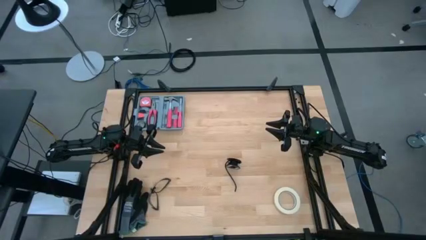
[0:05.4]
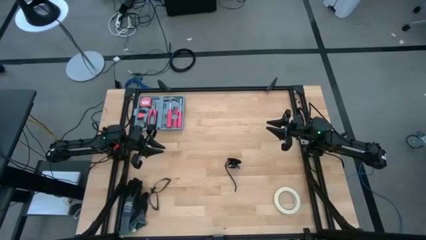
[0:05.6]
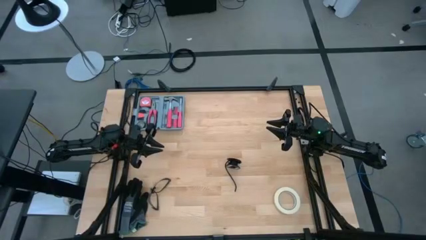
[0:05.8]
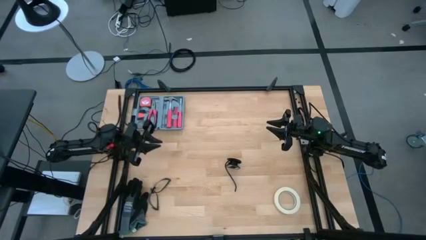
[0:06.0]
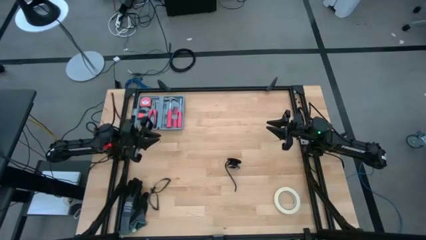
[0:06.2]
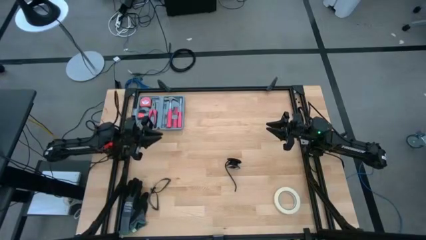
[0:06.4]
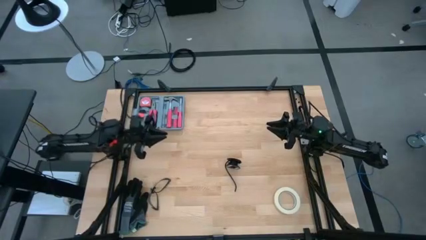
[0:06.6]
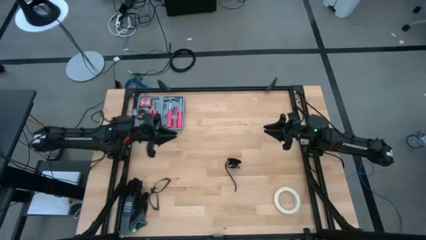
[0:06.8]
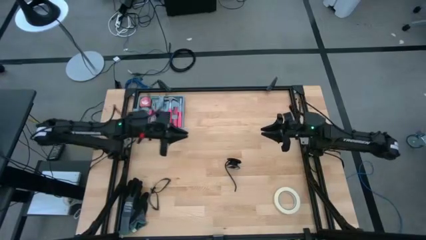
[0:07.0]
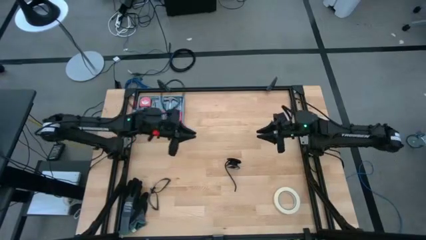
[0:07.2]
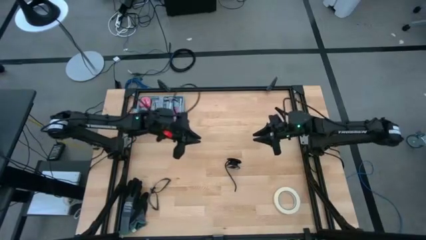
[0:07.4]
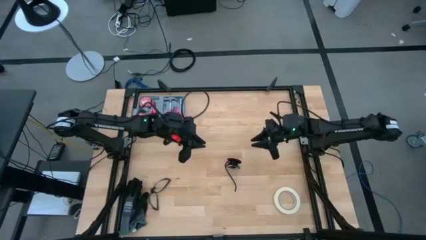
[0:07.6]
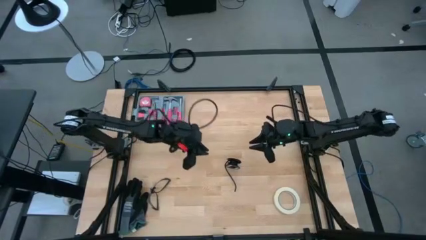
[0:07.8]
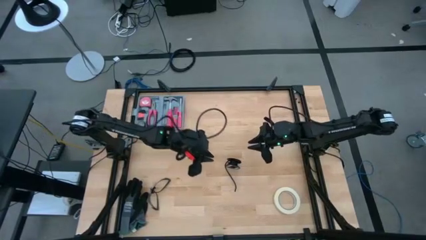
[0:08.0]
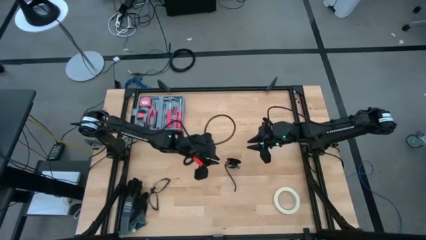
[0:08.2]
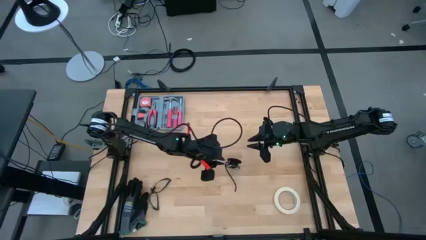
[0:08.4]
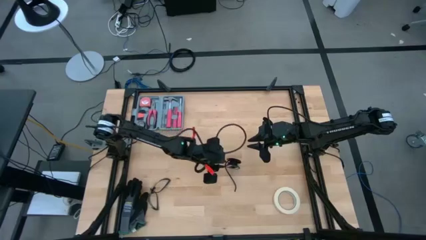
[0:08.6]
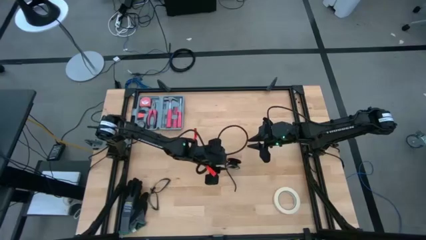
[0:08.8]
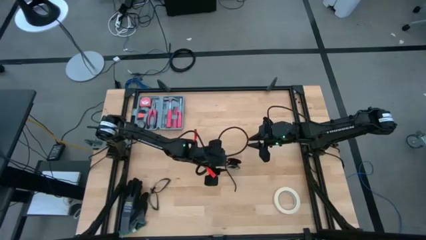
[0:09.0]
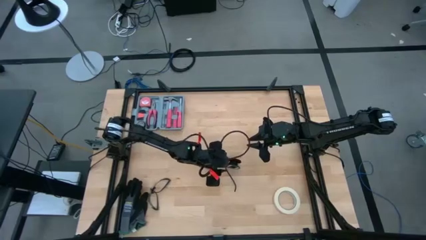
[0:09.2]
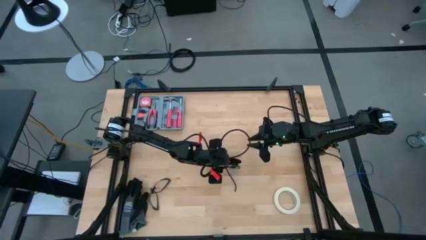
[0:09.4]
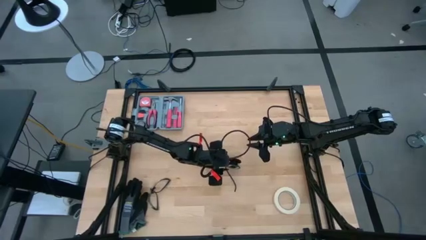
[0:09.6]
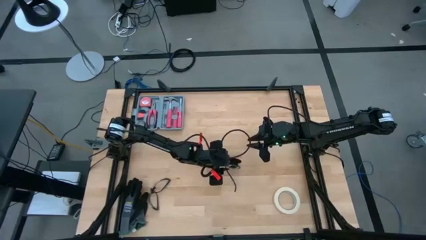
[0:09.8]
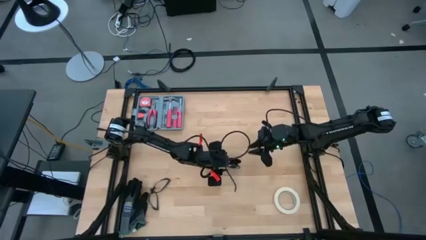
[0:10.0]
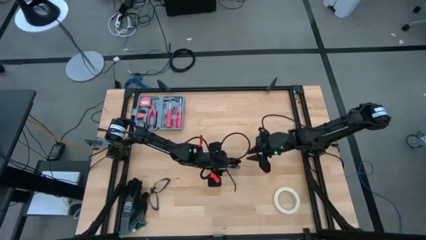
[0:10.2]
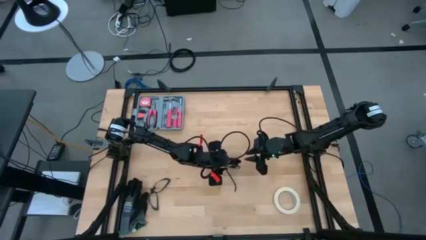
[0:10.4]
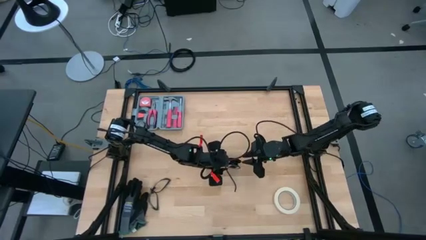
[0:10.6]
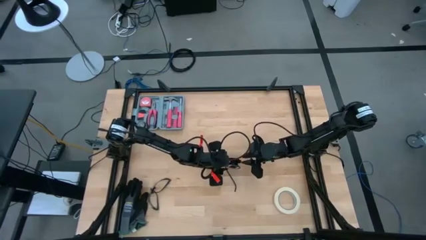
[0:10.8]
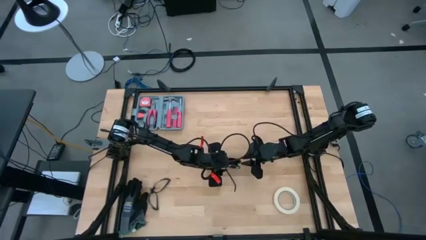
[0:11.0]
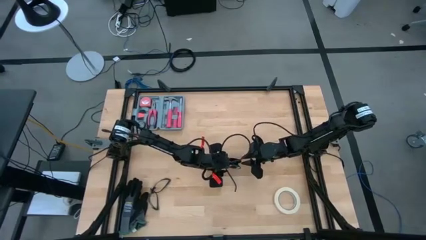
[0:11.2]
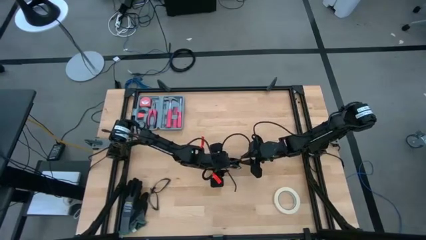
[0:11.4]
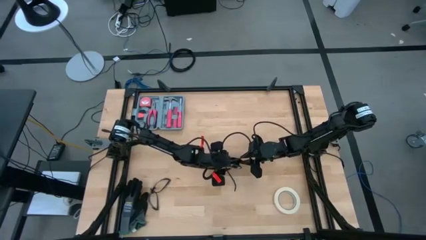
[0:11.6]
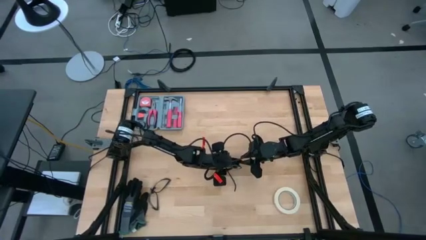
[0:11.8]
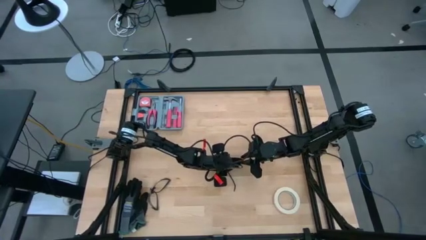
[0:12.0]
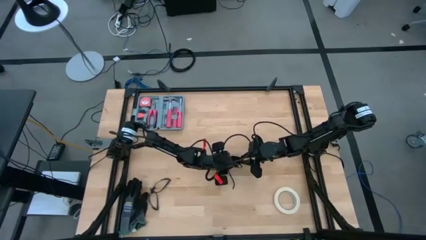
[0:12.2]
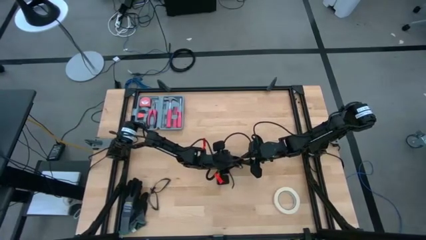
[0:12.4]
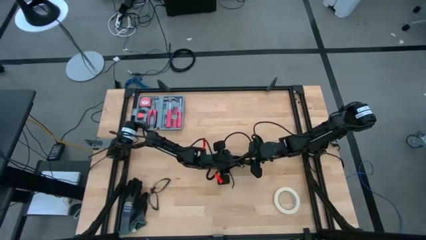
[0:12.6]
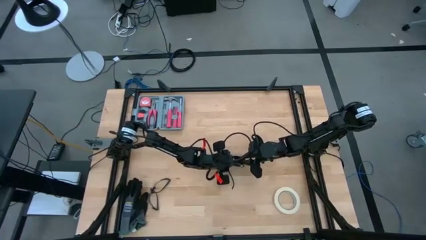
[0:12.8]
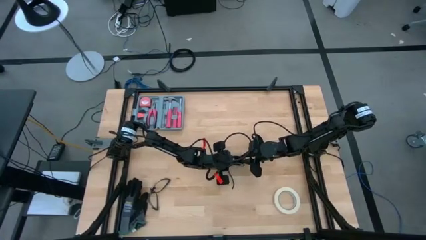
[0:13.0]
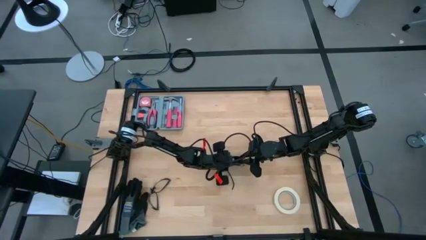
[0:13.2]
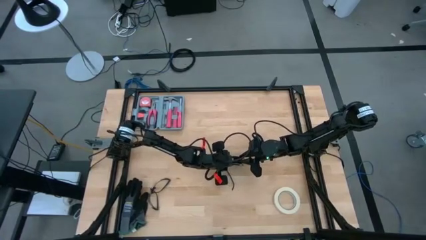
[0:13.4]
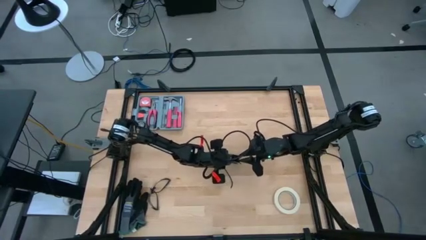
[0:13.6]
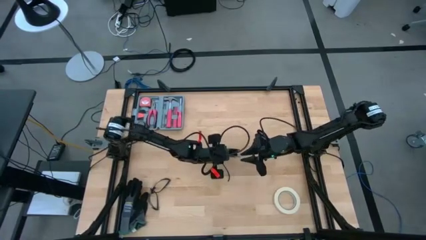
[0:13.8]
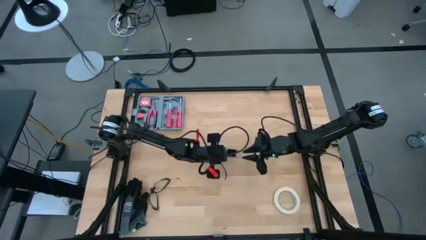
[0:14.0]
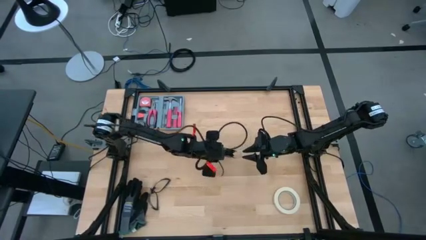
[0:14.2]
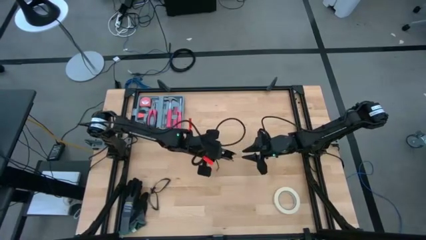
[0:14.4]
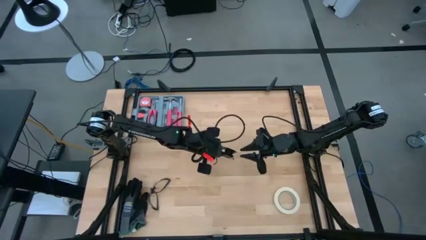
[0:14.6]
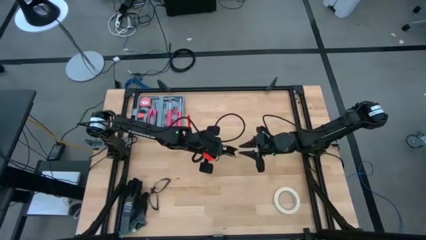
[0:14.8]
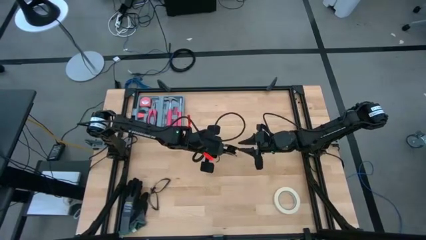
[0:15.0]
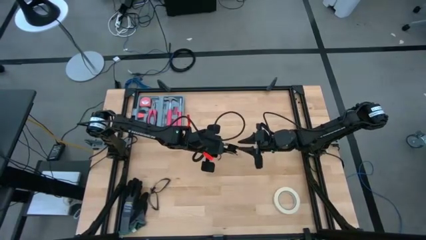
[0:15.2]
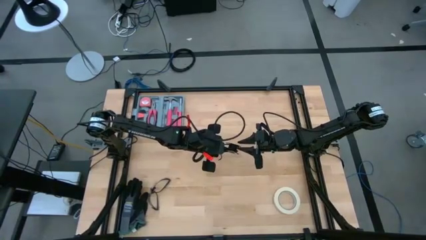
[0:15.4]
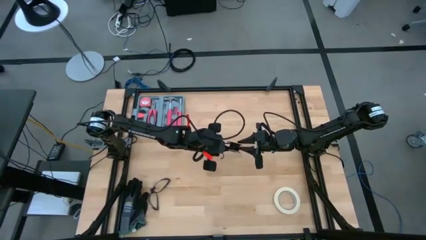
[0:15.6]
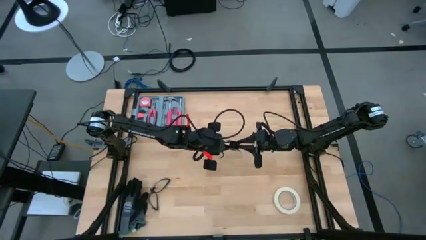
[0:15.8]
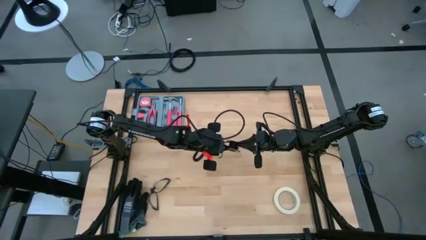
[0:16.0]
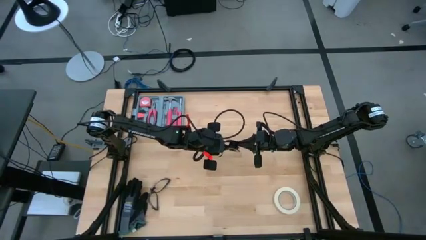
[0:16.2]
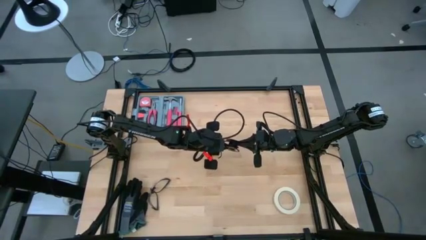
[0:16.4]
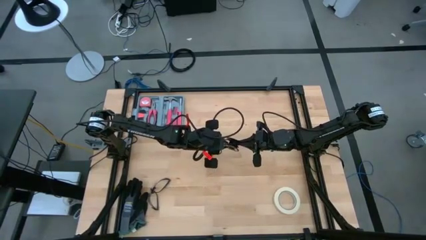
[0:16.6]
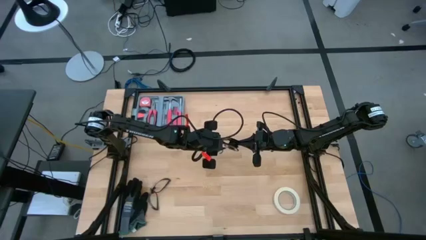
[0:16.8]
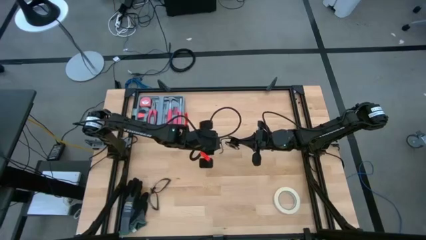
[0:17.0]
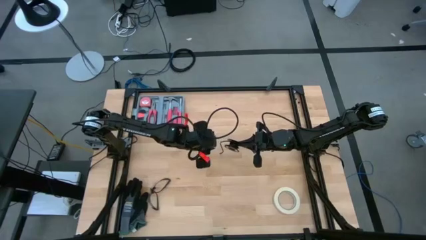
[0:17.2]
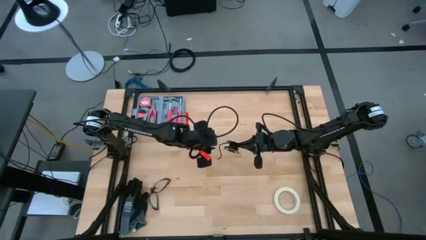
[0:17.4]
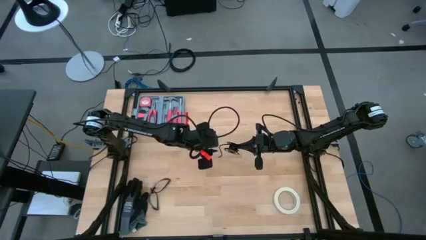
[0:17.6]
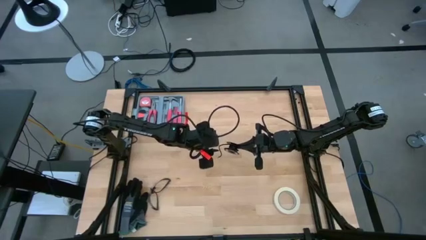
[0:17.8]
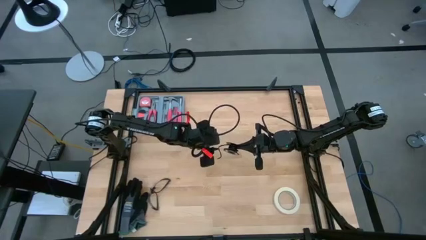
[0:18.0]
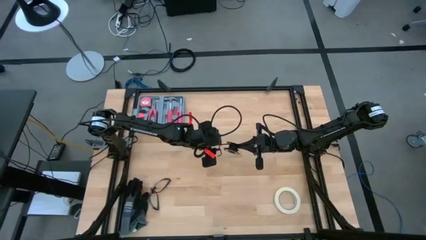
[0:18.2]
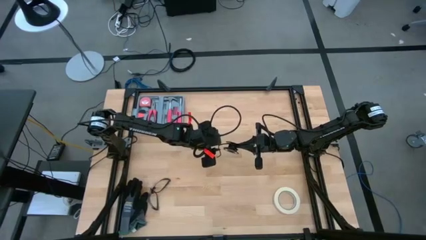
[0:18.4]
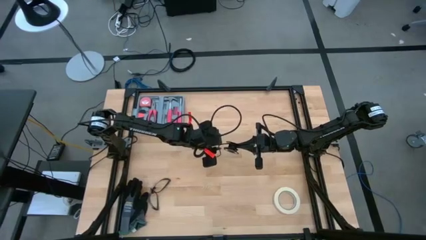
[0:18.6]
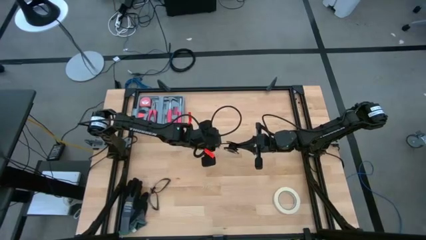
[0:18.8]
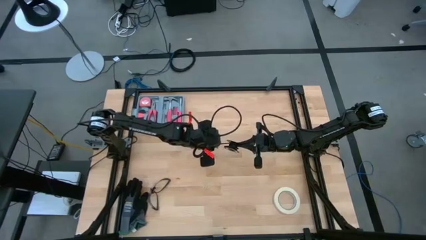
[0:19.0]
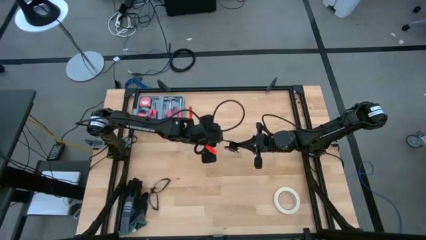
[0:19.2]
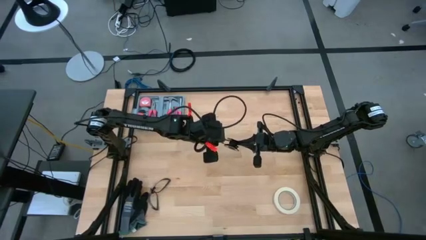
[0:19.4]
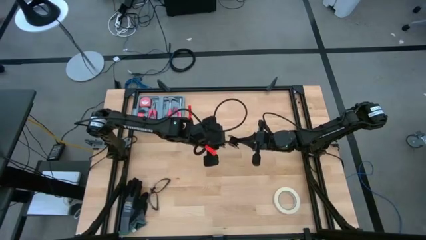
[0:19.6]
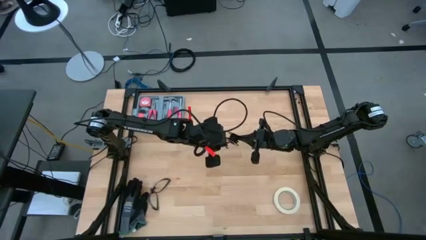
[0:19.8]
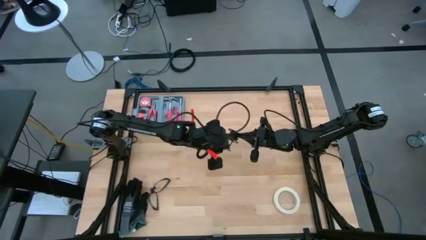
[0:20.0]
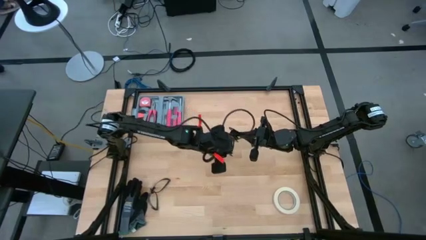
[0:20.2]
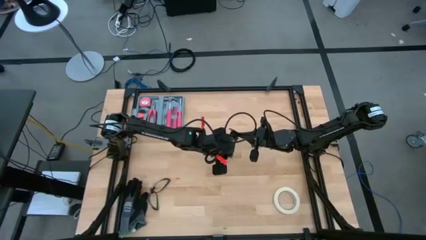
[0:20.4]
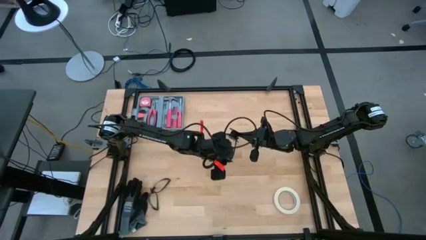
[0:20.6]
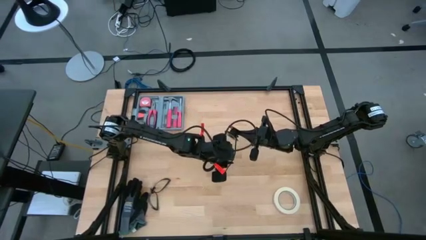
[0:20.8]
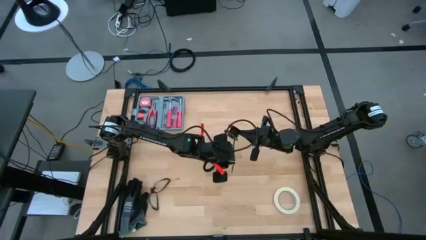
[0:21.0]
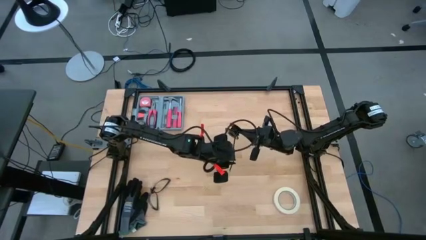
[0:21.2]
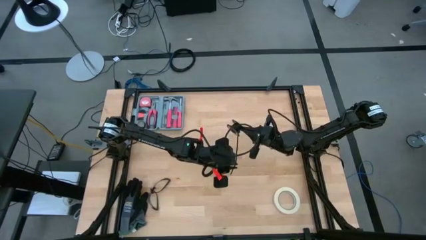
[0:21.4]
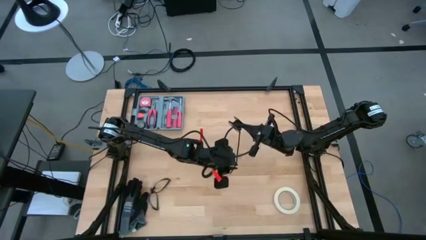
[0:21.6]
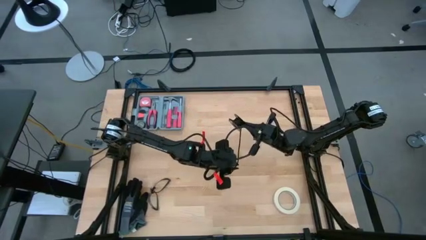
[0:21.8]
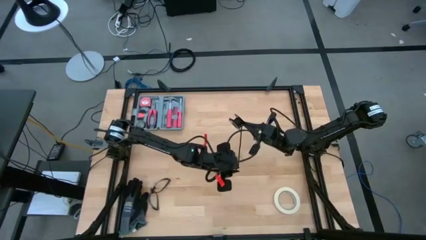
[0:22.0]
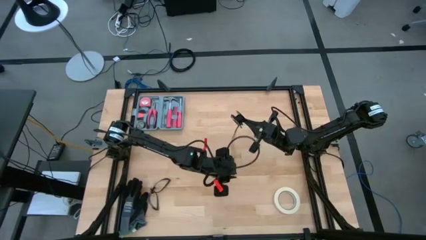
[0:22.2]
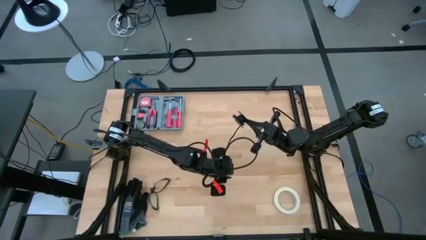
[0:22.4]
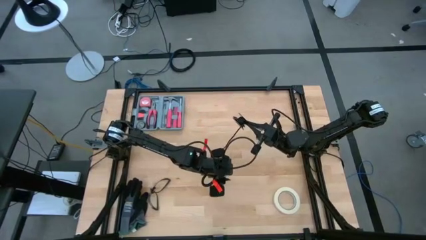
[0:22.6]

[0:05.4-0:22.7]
Task: Coil cords
Uncoil the black wire from the spool
